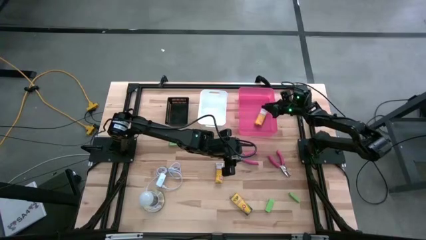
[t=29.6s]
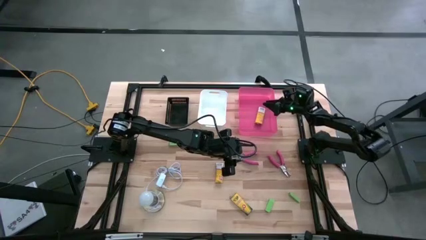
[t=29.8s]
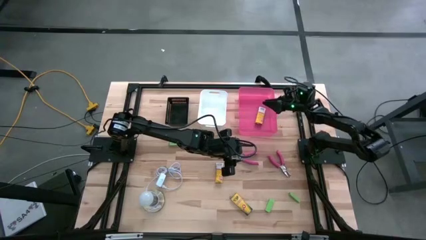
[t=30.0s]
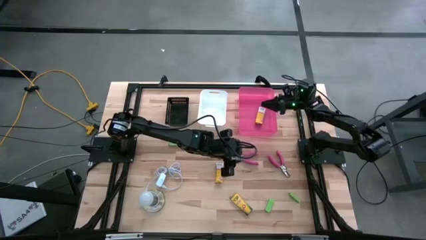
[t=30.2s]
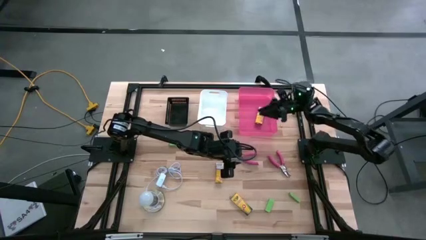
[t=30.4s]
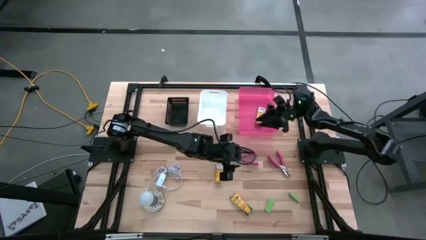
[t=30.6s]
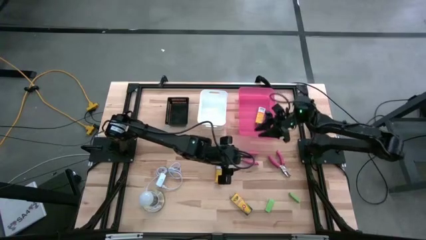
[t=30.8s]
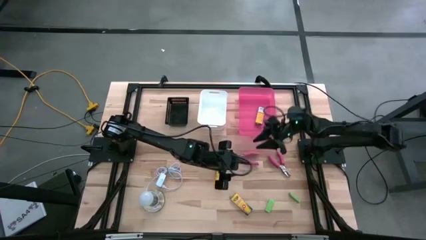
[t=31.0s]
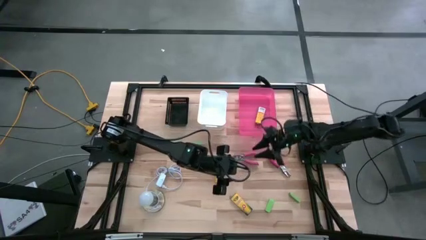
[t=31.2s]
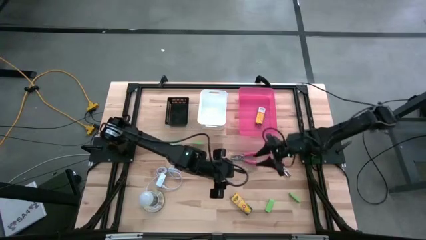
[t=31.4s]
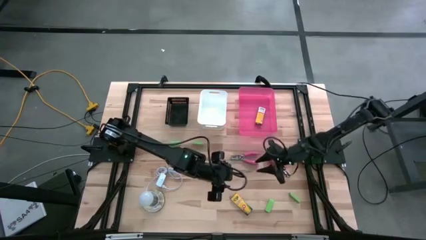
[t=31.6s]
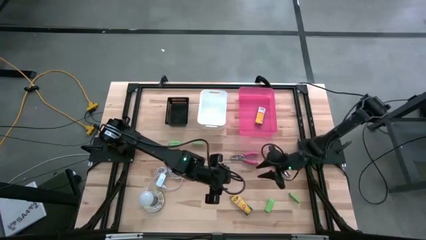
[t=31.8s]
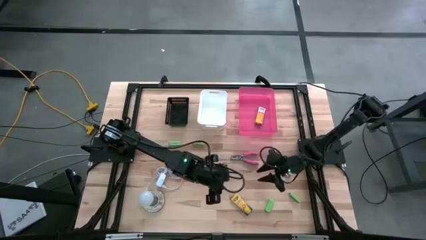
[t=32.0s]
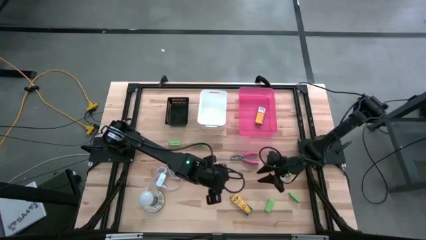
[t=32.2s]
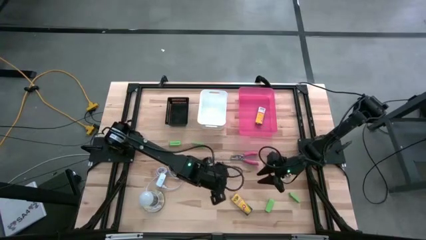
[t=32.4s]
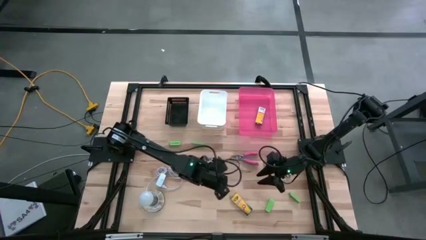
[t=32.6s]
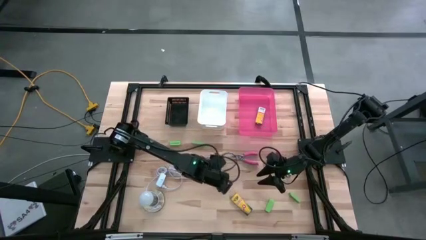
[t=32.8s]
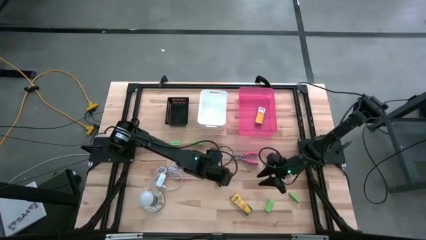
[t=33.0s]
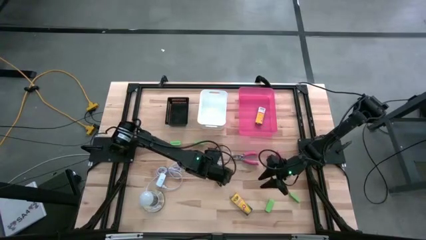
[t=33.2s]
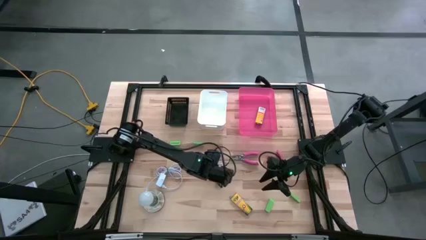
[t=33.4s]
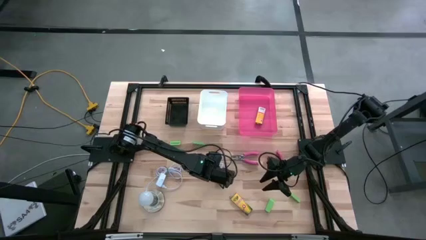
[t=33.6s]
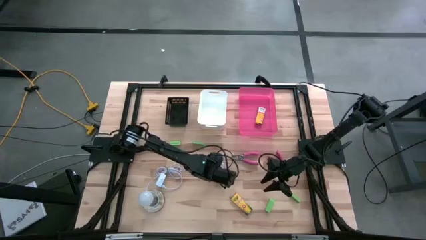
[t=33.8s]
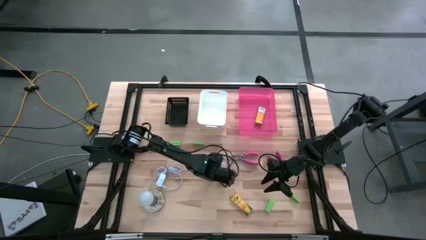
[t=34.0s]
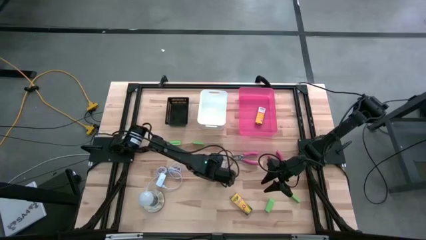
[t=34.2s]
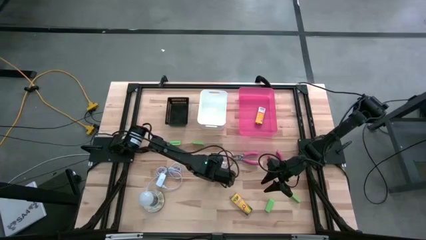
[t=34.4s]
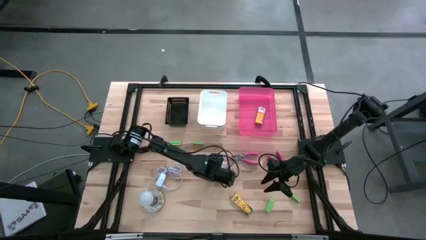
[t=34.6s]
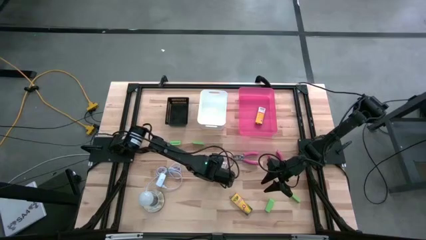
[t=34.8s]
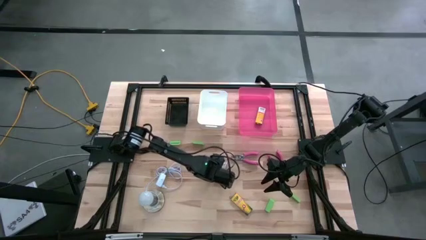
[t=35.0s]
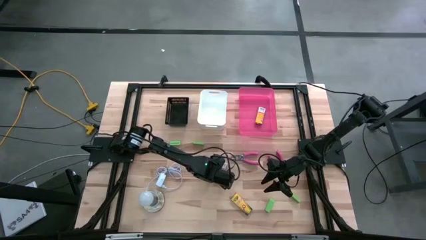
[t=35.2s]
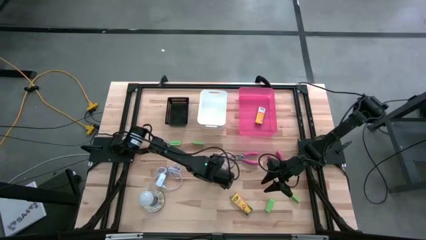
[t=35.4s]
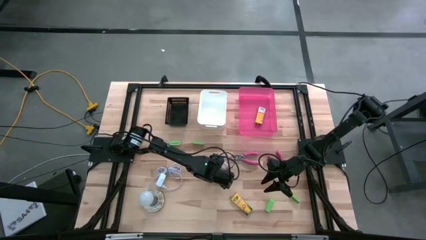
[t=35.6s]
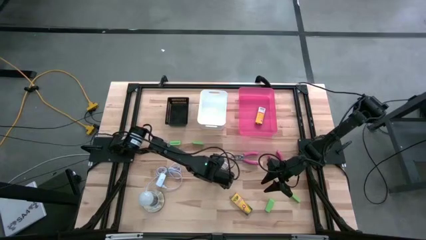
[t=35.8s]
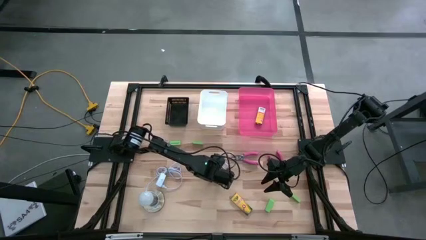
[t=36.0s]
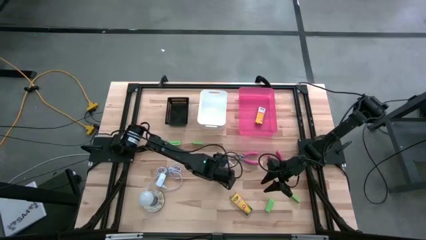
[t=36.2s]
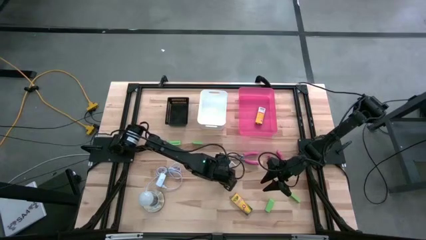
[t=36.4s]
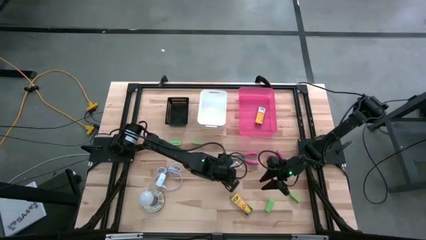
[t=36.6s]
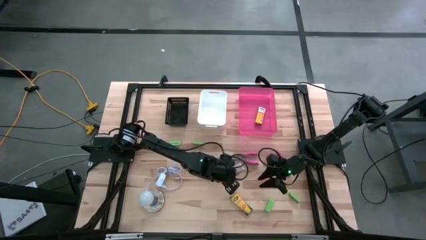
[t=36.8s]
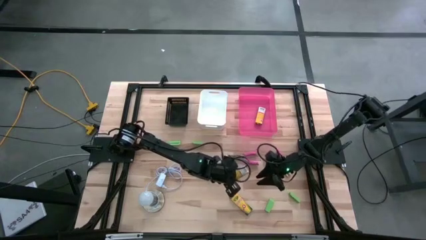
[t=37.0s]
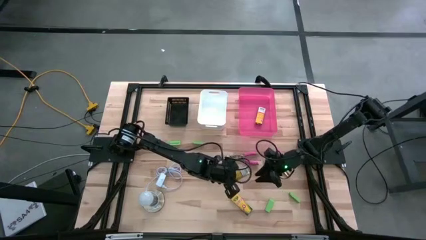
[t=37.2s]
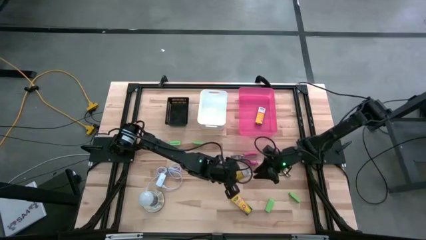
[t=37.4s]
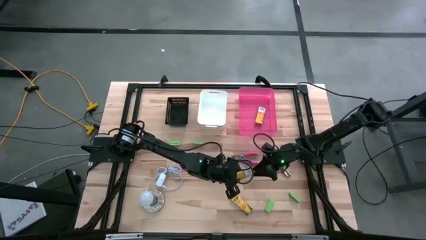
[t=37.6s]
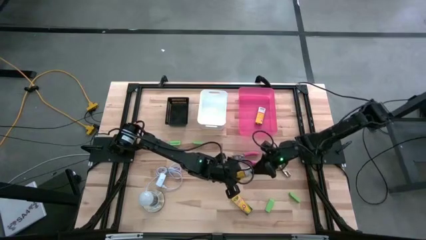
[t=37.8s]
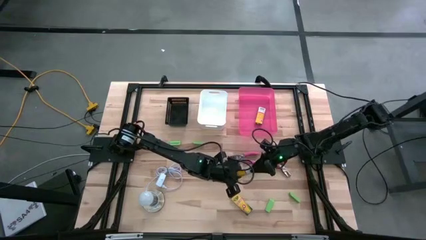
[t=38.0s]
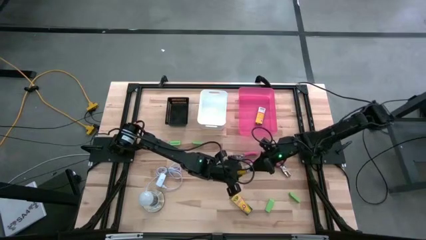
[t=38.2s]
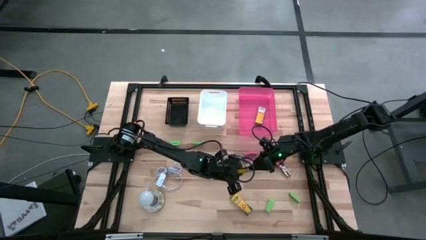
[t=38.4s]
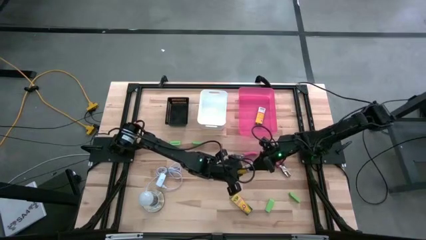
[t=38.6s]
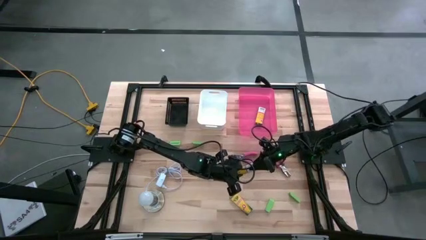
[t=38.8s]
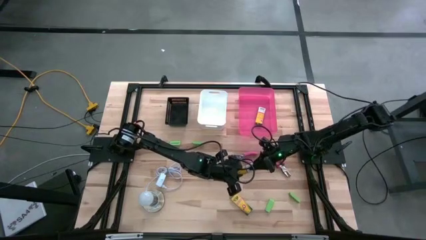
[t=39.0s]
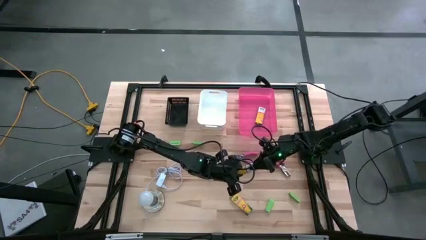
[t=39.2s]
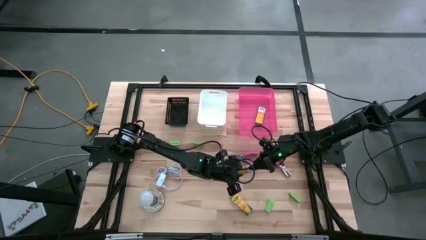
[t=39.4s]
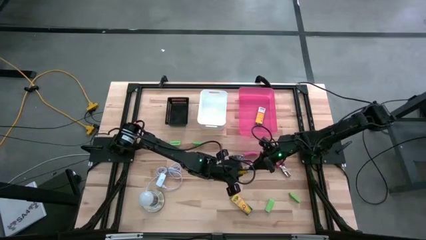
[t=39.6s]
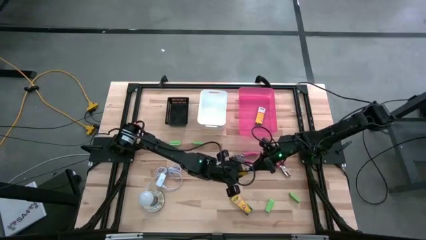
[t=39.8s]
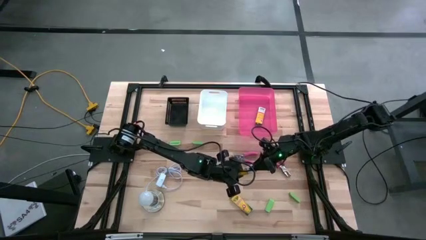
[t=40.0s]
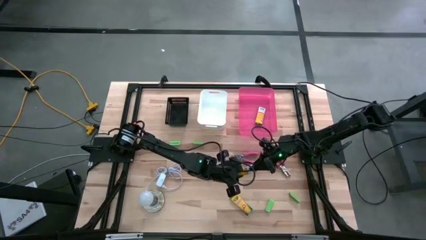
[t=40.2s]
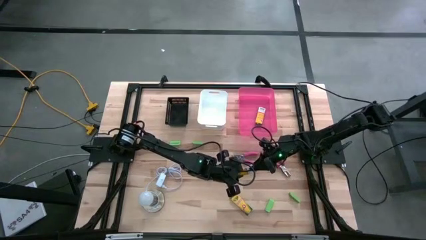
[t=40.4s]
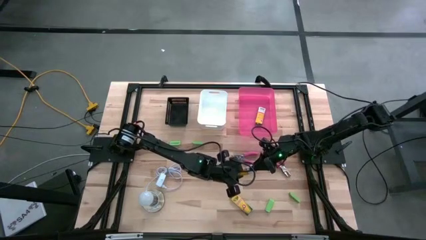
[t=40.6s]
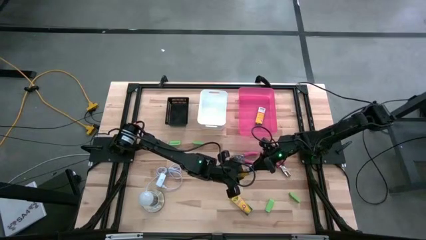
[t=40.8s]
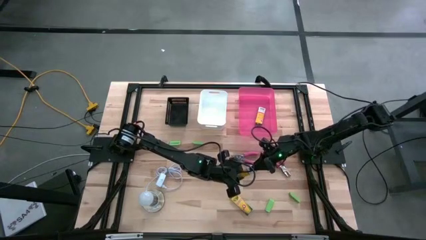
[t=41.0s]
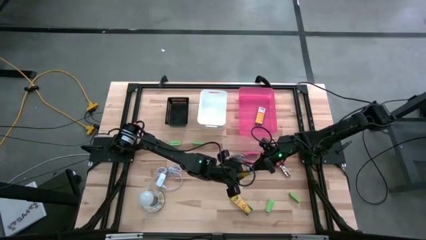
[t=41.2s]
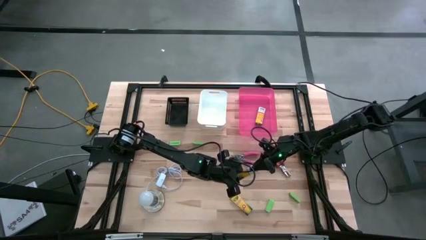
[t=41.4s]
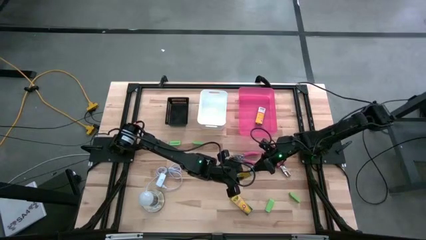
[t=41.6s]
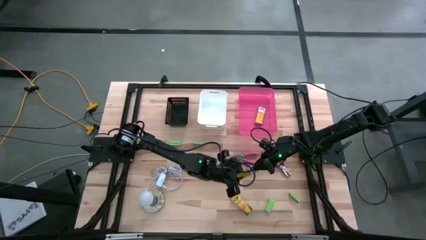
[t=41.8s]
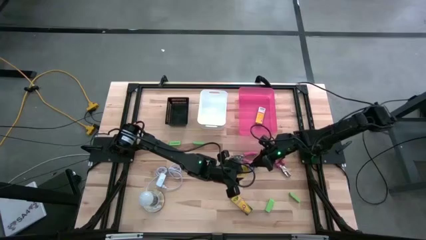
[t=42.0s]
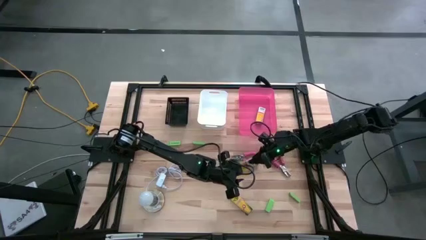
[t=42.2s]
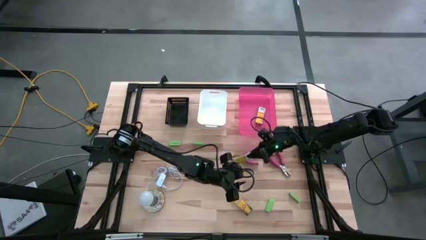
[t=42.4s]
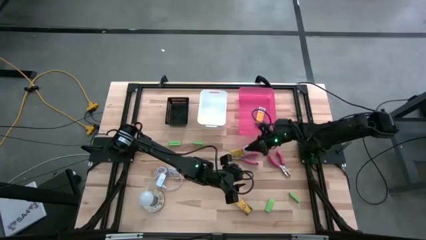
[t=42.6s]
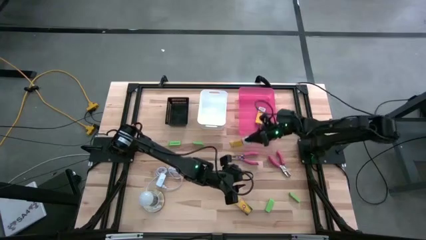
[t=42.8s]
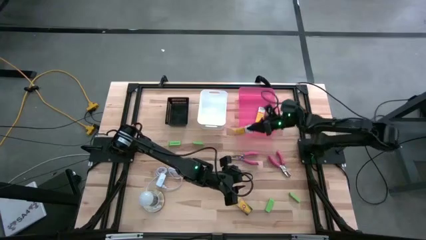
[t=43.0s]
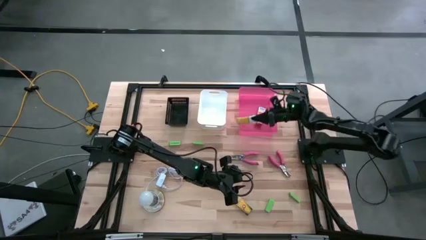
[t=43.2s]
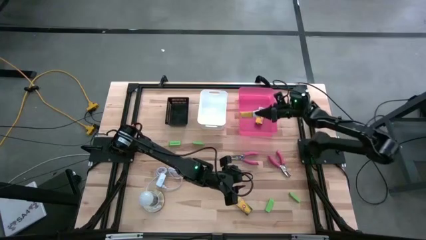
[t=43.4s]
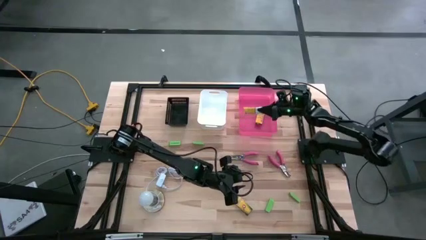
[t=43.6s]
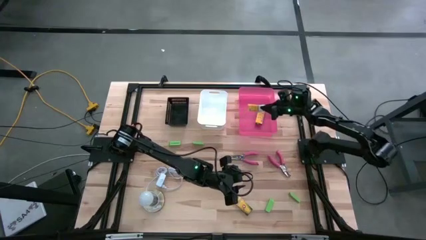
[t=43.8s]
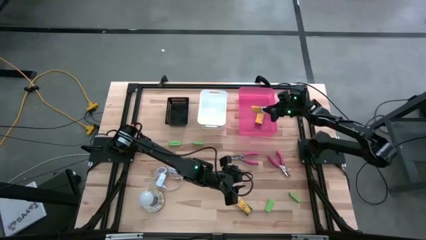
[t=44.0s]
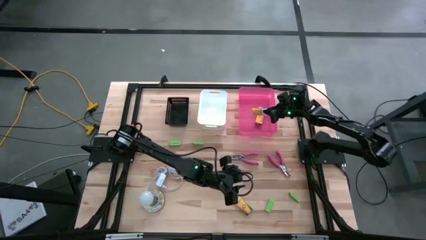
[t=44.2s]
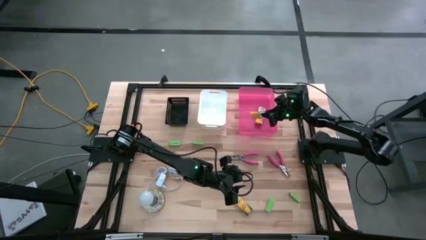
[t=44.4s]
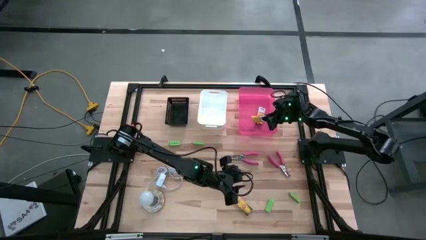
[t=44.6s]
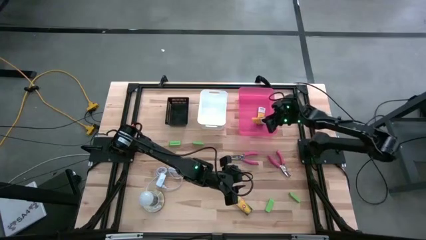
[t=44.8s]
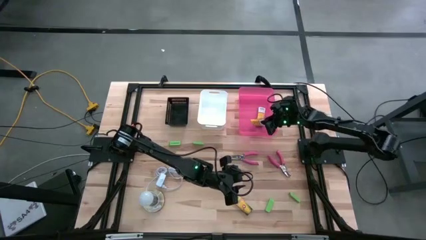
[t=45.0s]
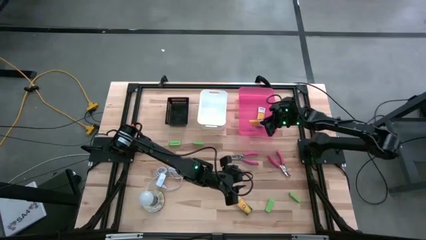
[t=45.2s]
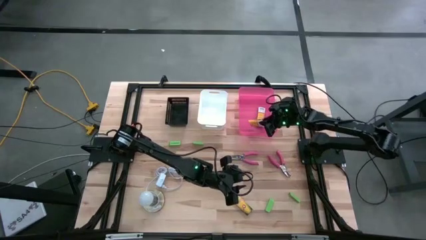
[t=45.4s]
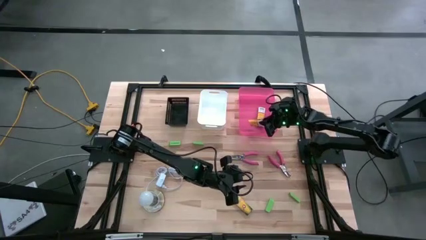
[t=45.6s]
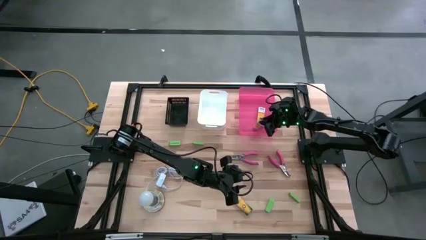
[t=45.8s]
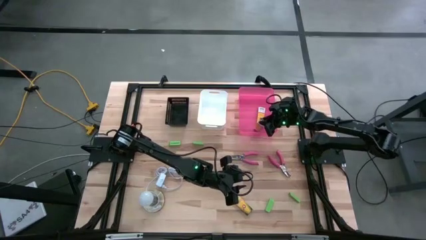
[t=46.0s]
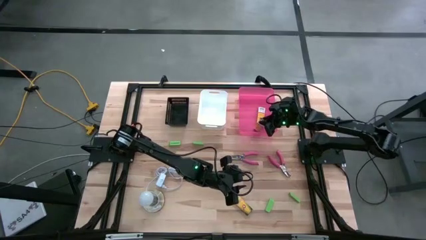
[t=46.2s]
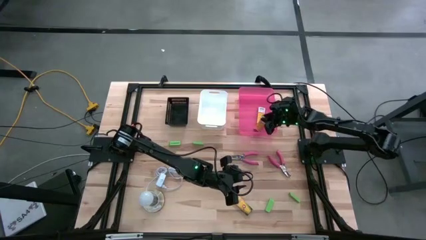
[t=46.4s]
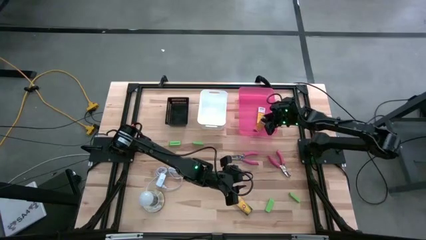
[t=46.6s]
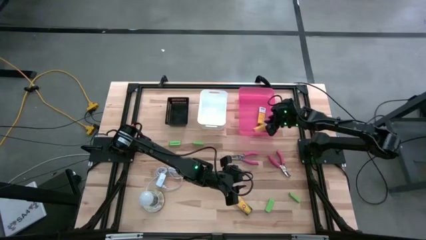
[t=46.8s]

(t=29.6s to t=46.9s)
Task: Pick & Place School Supplies
Put the top crayon box into the pink bin
